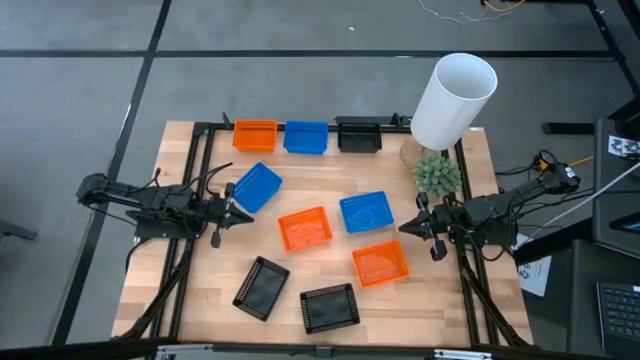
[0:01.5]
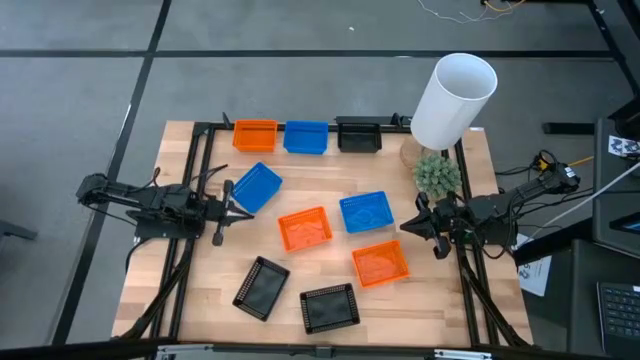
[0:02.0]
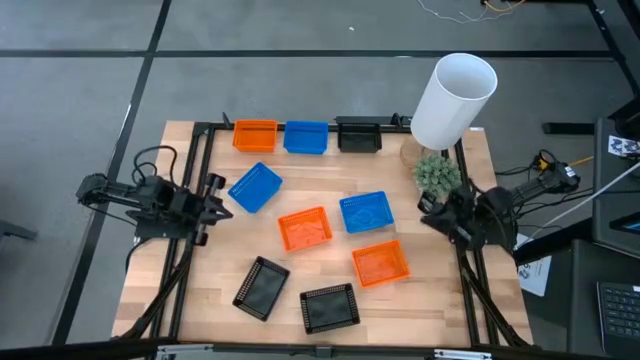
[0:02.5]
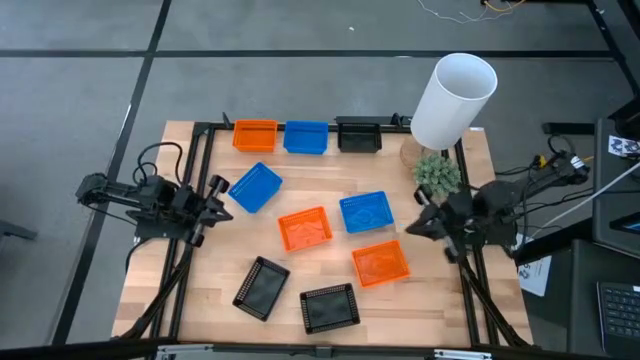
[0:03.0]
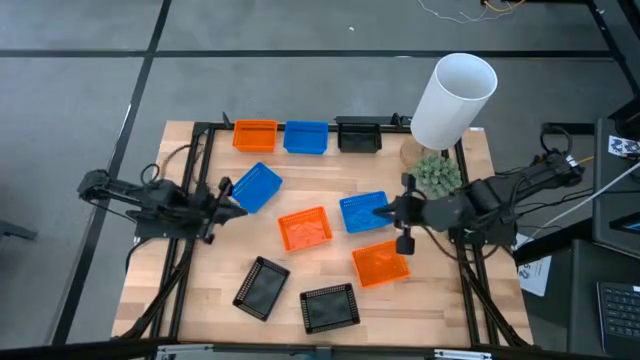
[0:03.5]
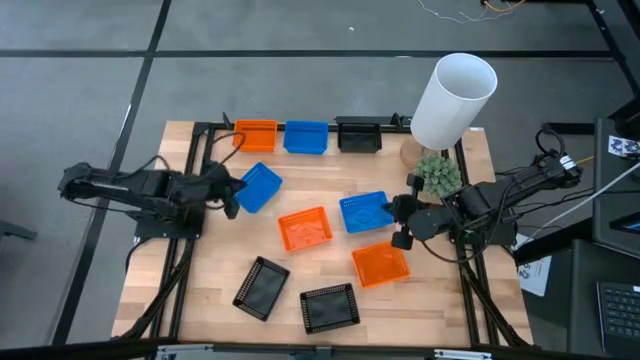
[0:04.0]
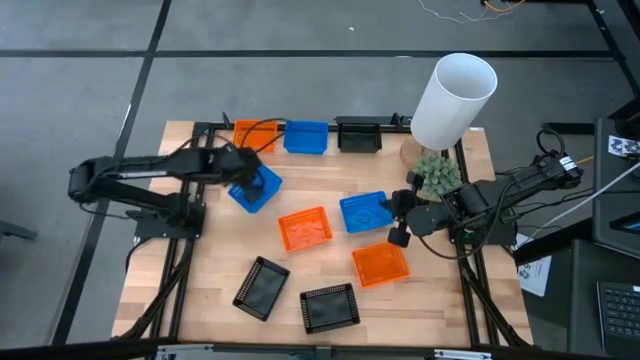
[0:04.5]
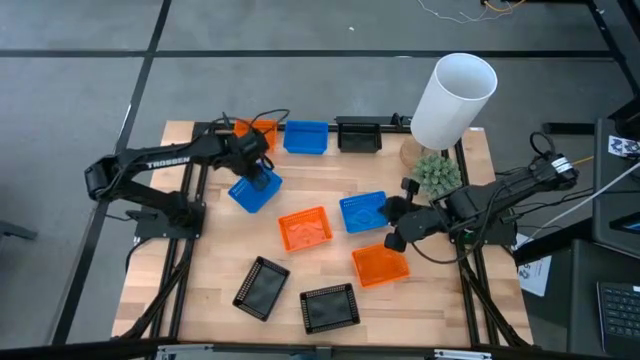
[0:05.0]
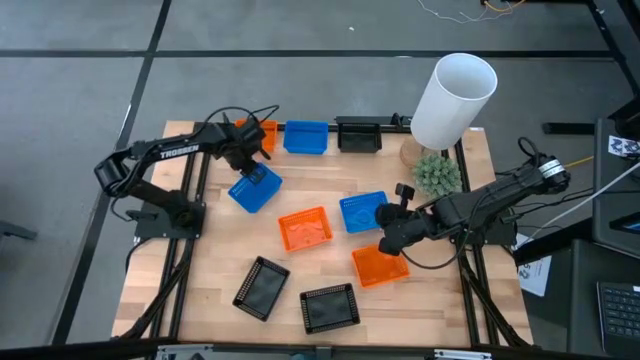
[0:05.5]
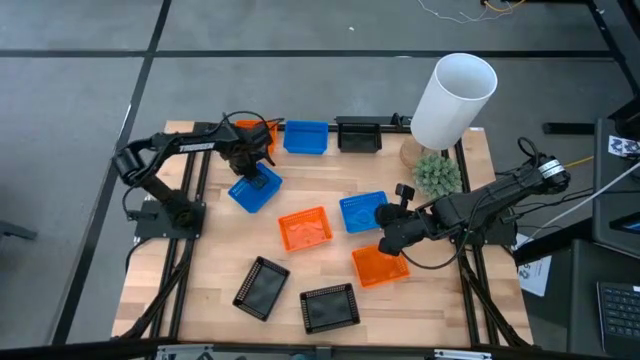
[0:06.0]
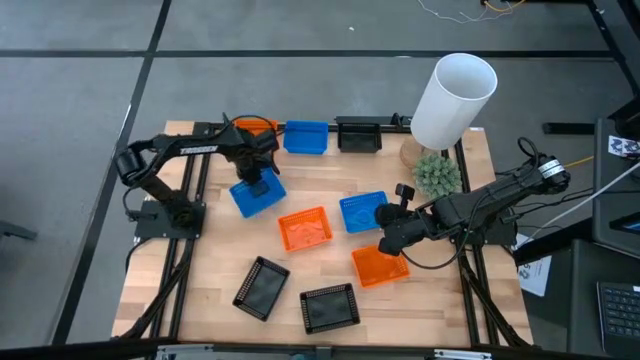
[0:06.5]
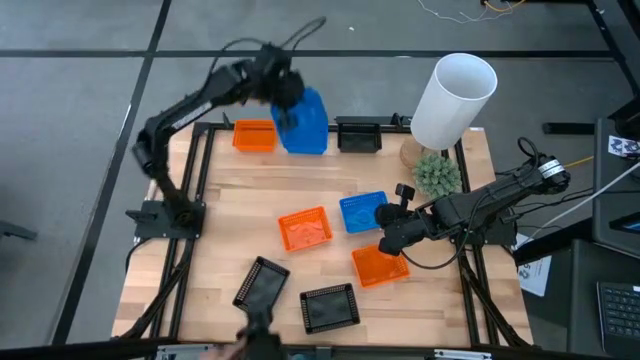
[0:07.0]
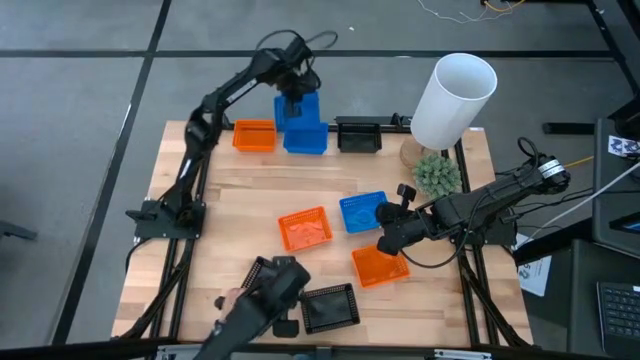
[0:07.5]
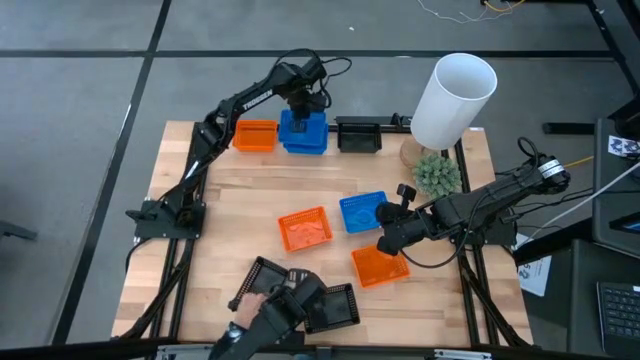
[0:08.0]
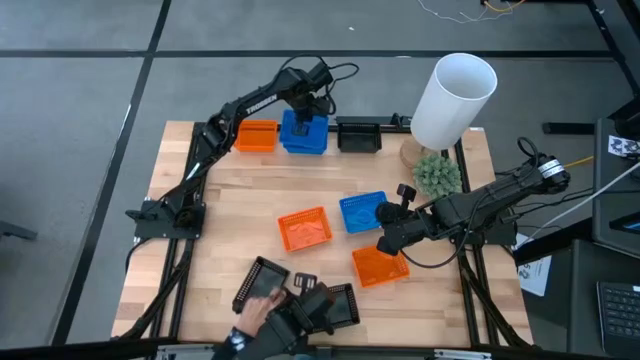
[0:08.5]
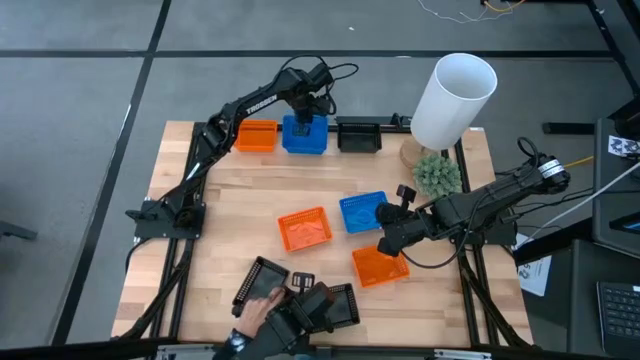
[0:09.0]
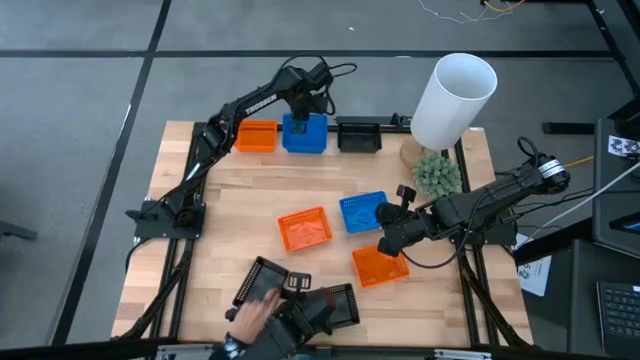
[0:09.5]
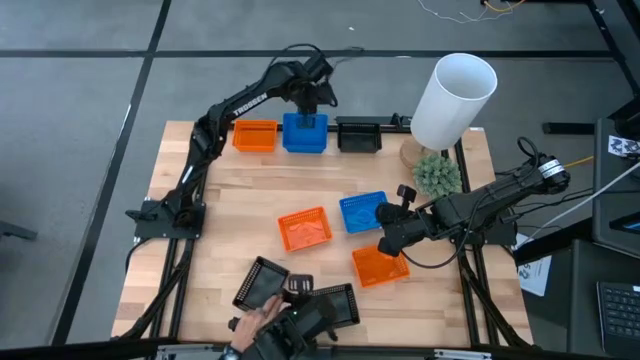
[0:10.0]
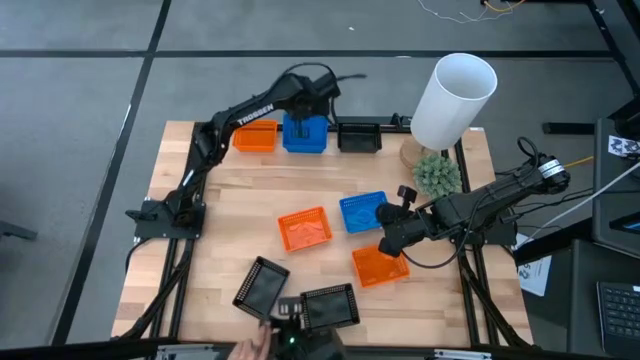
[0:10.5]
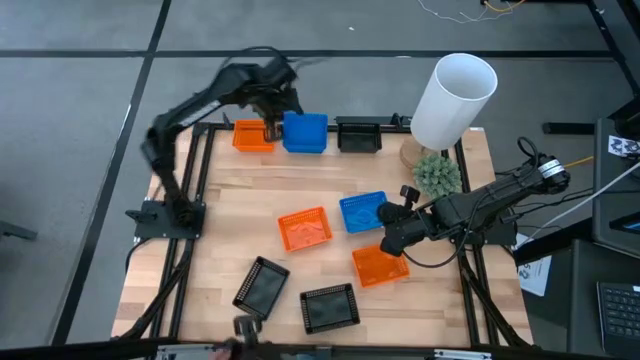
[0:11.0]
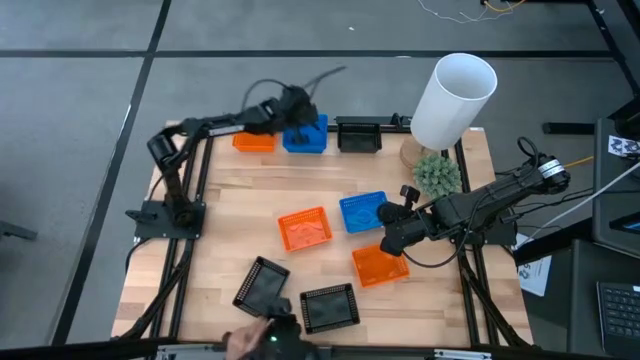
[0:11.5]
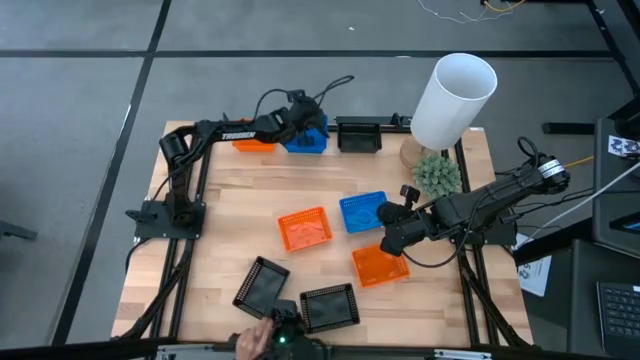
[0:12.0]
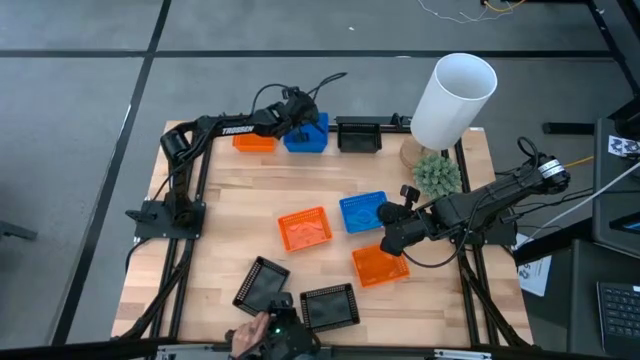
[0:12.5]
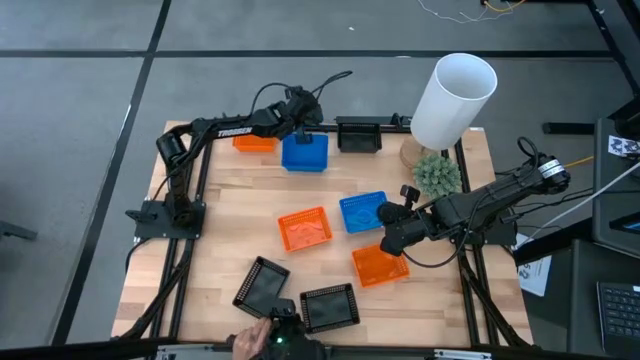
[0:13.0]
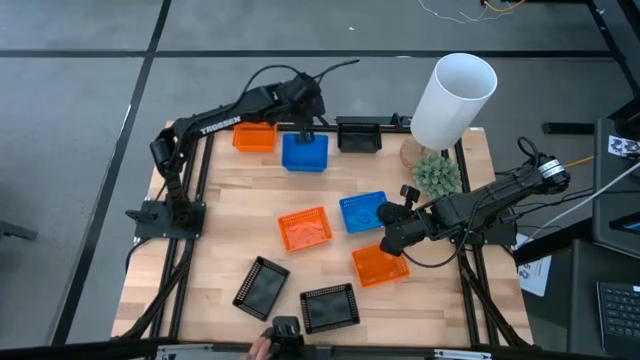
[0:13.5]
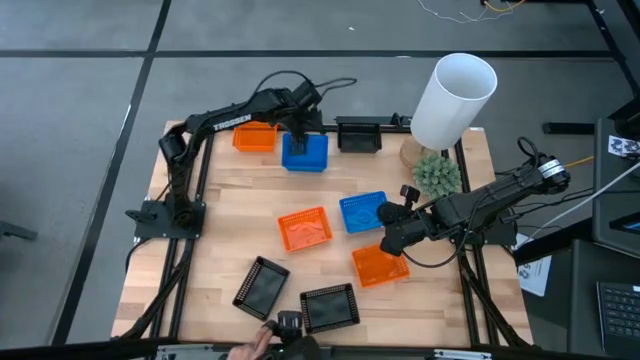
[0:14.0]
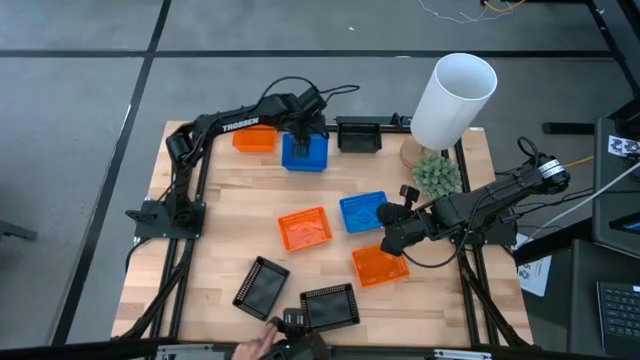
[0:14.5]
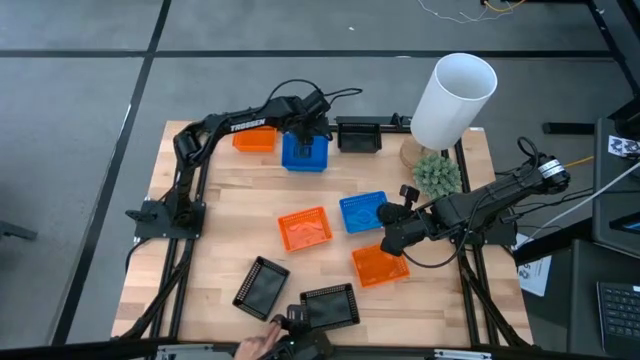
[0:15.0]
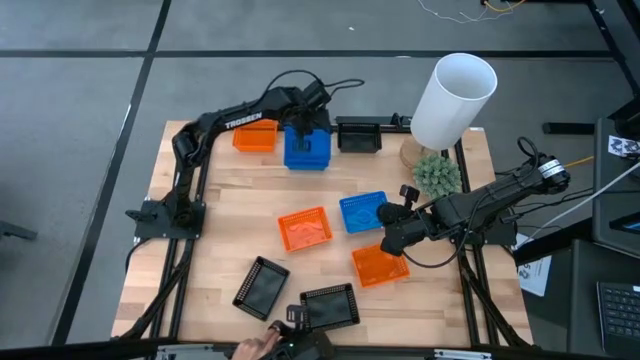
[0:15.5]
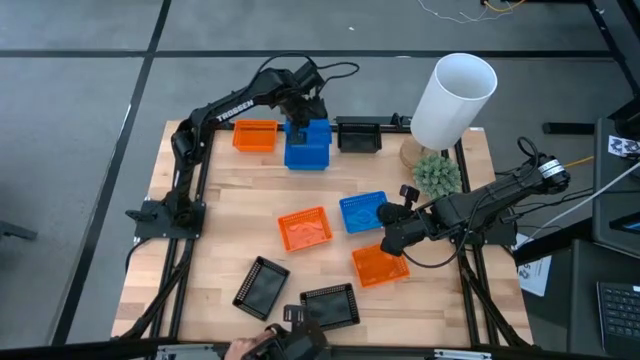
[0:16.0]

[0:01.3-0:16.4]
Stack the bottom left blue bin on the top blue bin

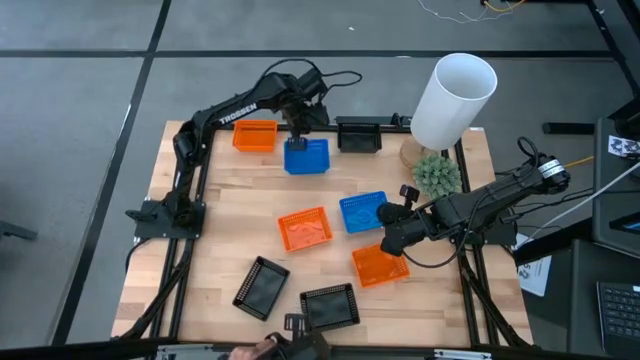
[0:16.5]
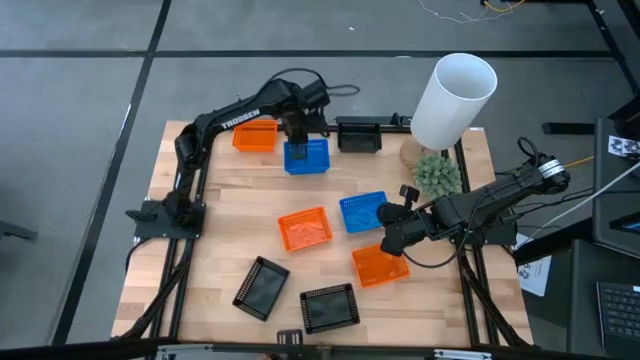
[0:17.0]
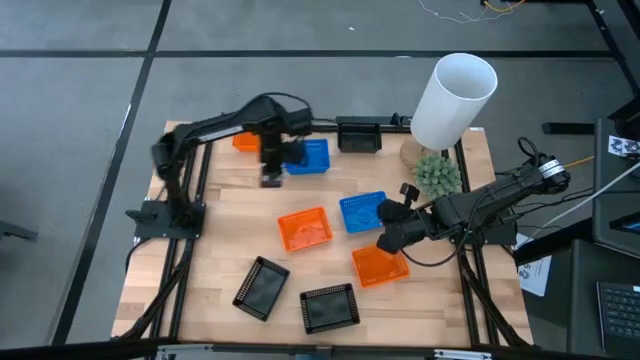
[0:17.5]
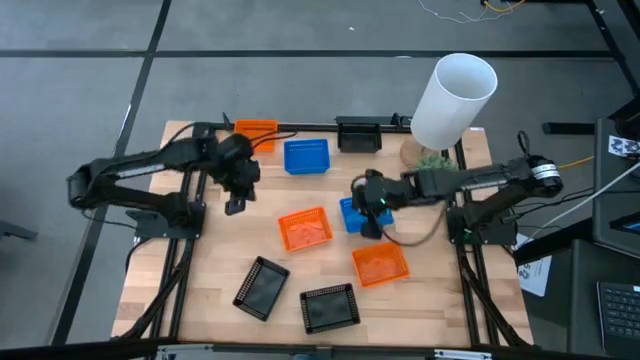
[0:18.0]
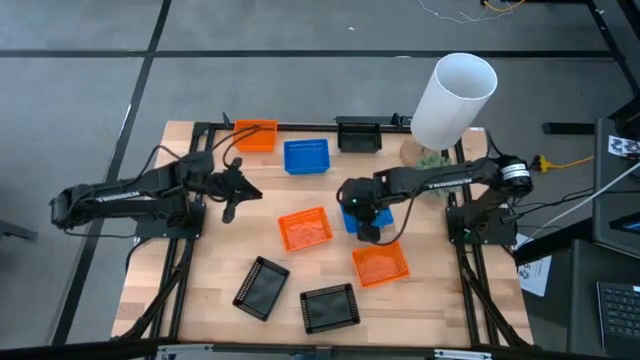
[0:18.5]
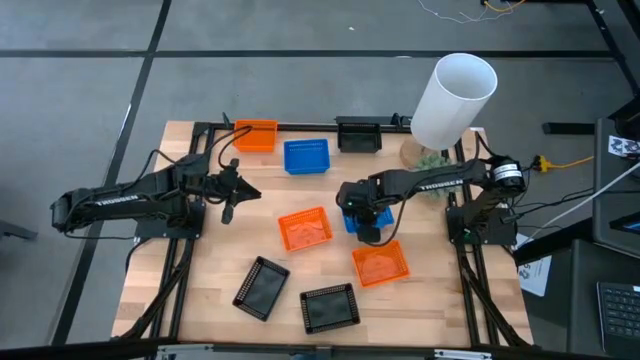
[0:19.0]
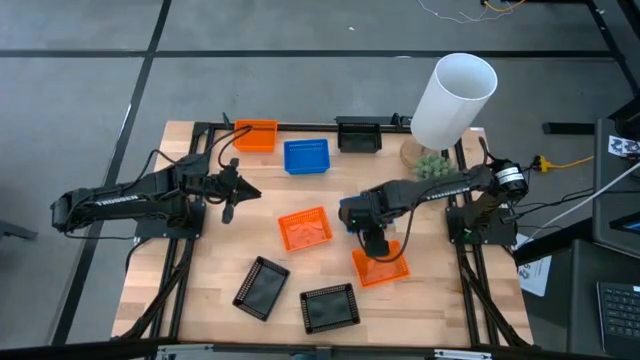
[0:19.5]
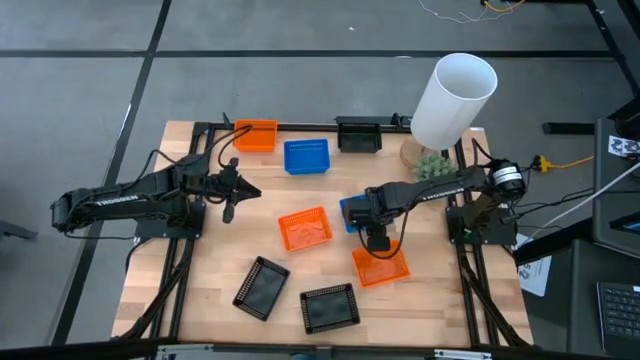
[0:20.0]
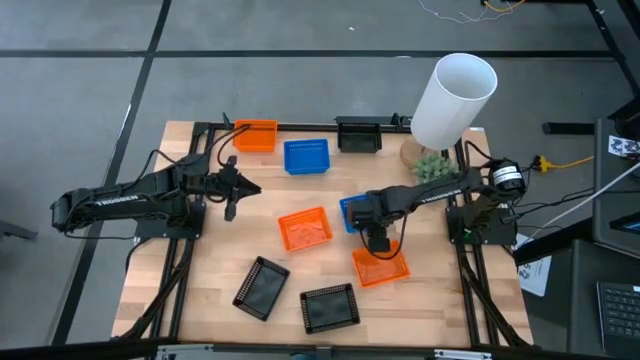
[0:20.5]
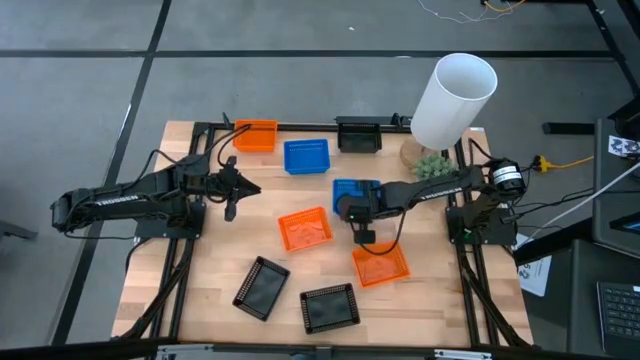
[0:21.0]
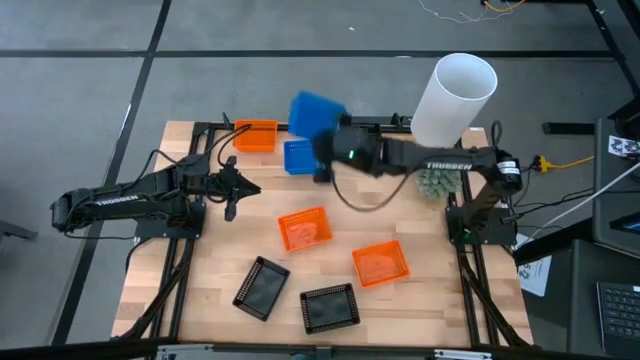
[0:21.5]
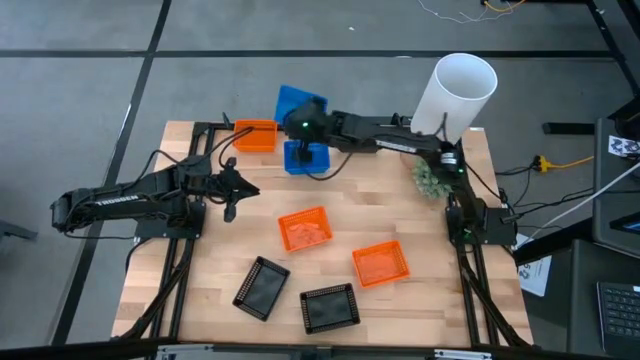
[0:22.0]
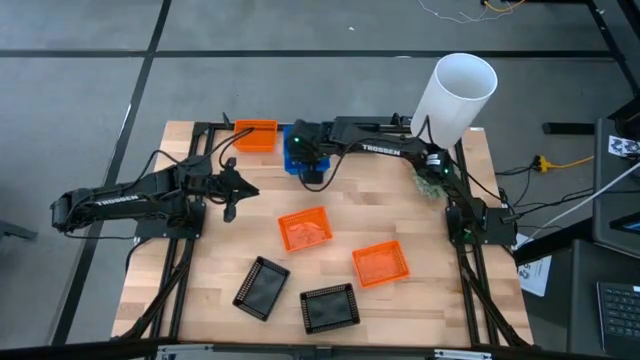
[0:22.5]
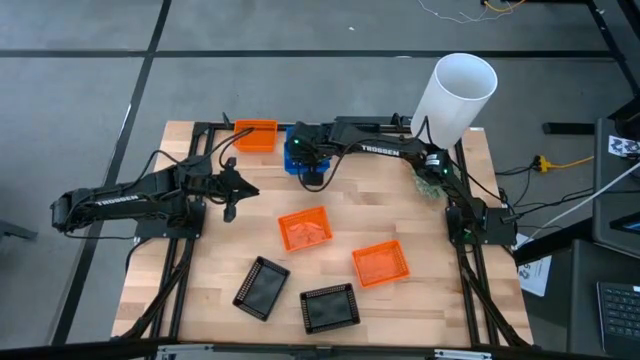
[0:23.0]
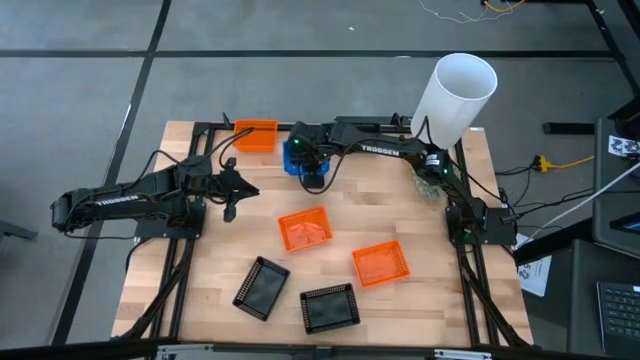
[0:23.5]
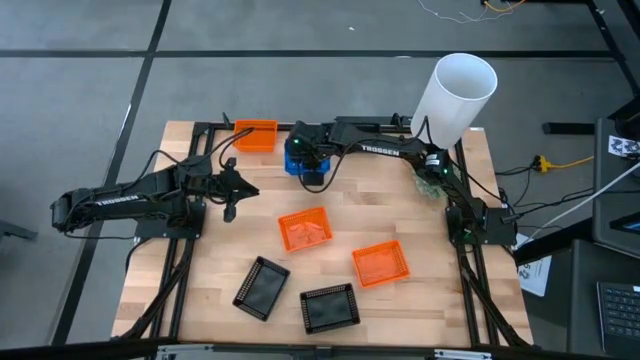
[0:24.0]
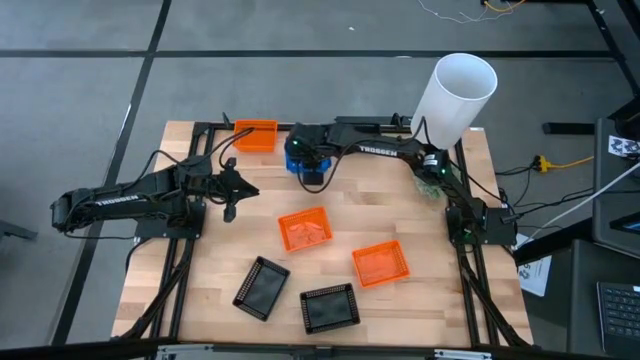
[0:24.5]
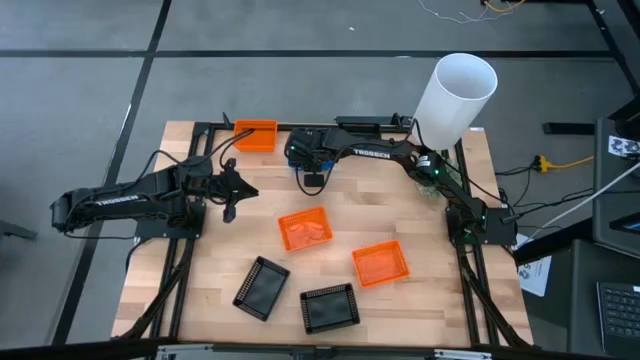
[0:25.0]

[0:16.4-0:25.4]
Stack the bottom blue bin on the top blue bin
